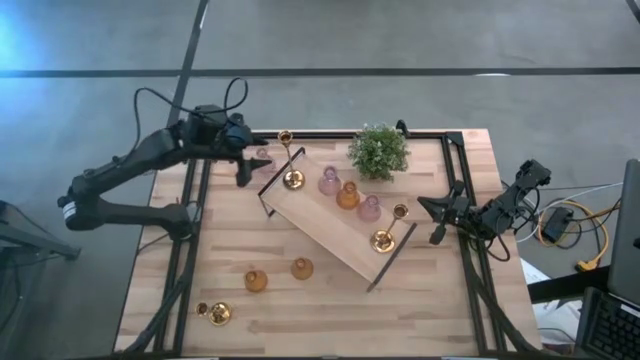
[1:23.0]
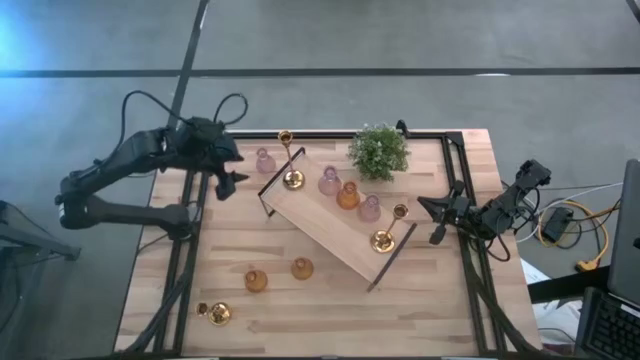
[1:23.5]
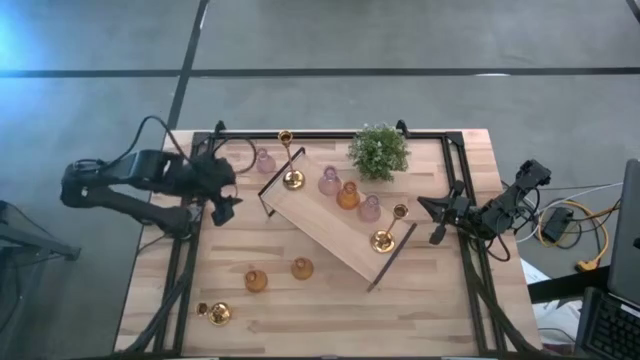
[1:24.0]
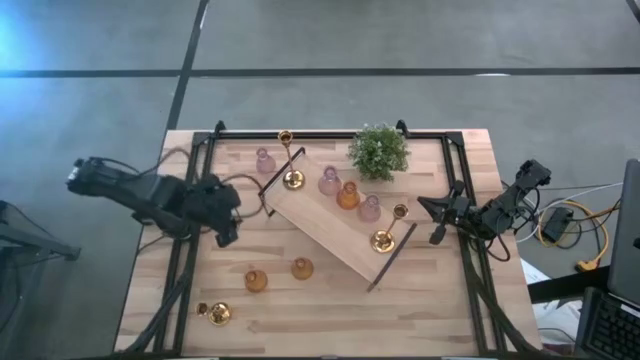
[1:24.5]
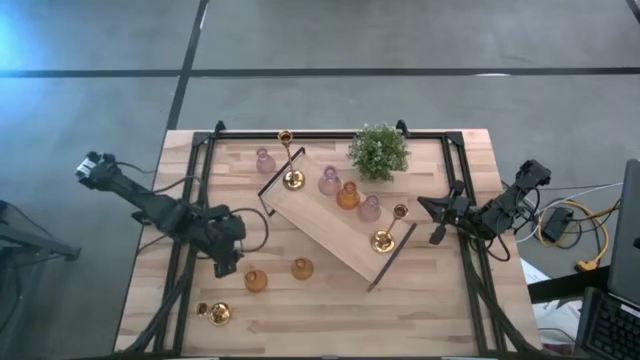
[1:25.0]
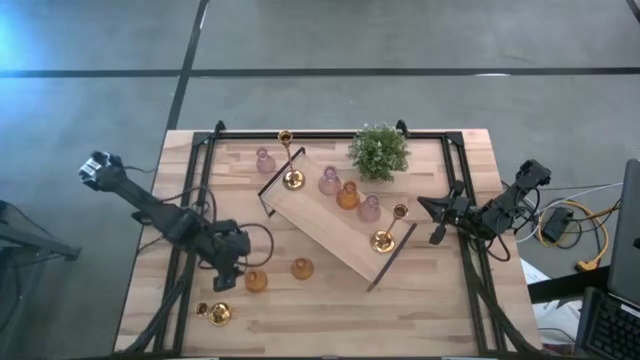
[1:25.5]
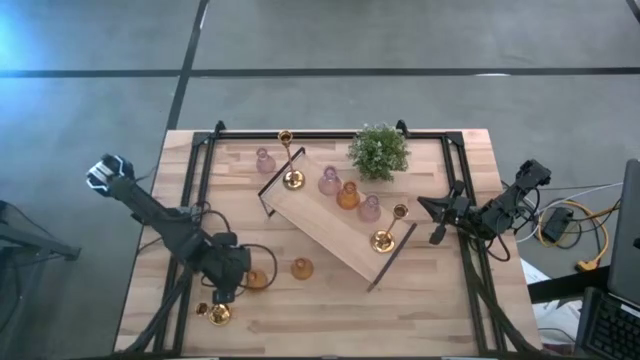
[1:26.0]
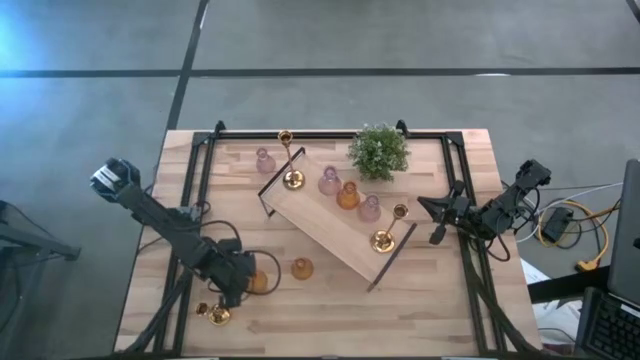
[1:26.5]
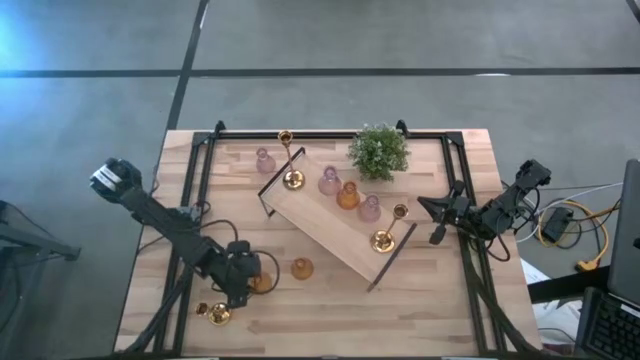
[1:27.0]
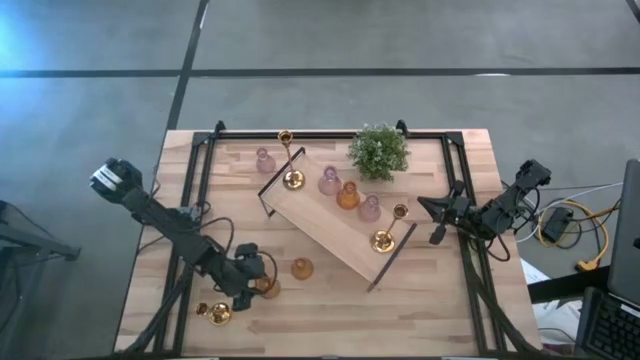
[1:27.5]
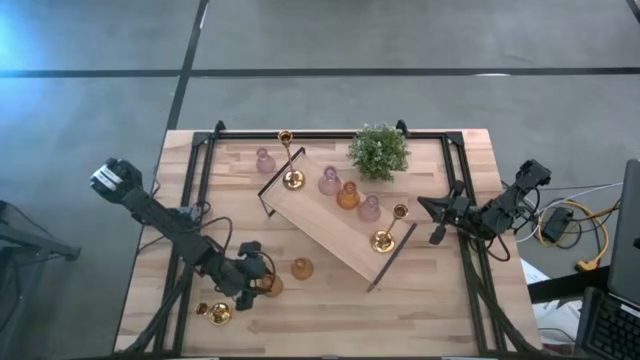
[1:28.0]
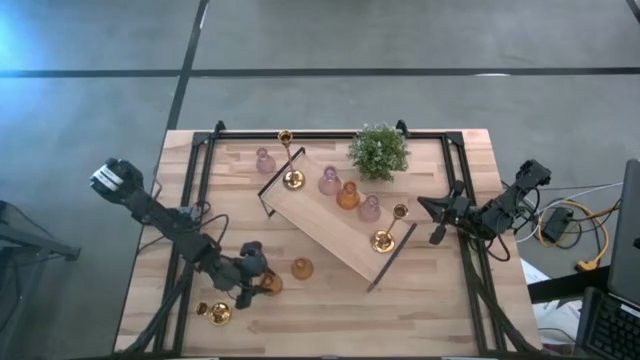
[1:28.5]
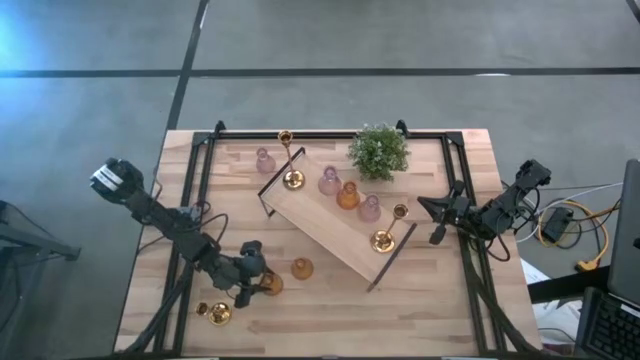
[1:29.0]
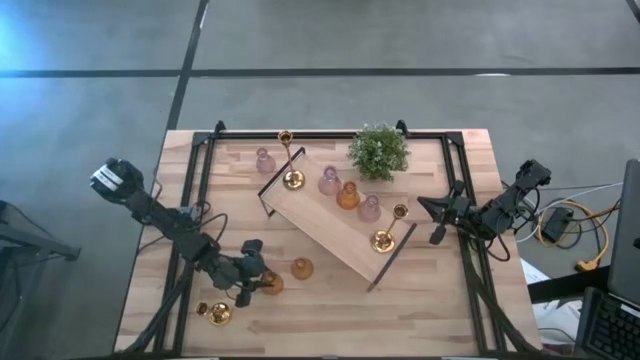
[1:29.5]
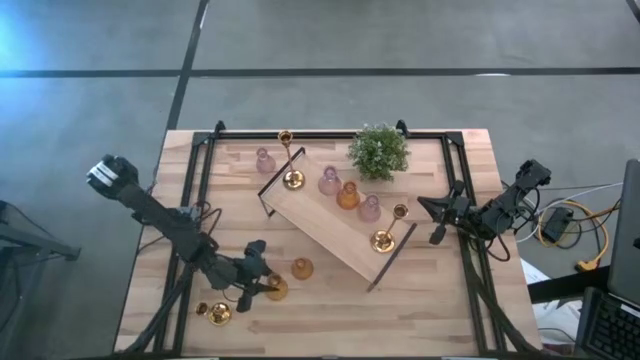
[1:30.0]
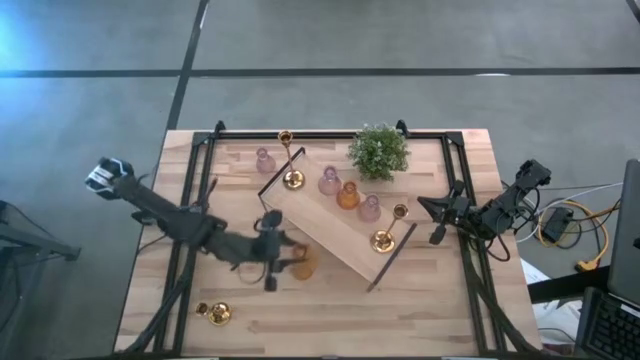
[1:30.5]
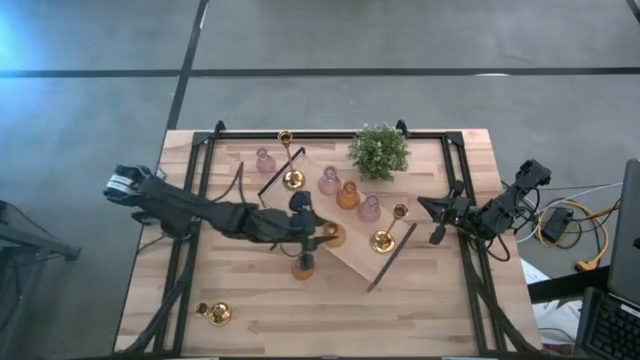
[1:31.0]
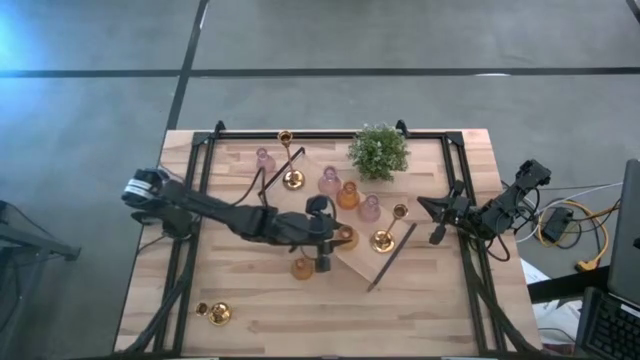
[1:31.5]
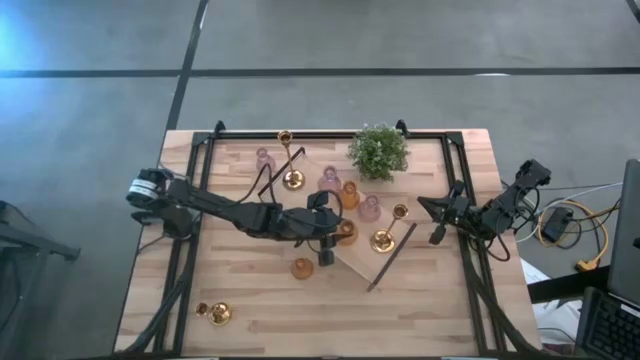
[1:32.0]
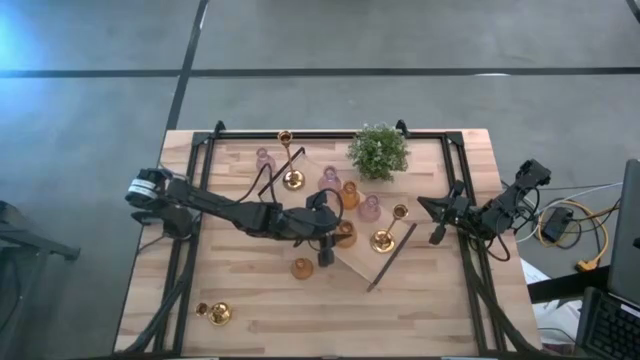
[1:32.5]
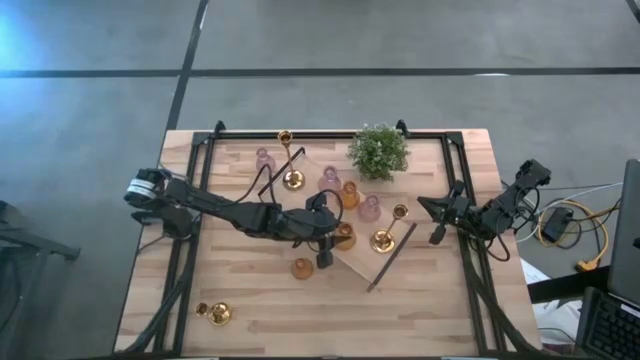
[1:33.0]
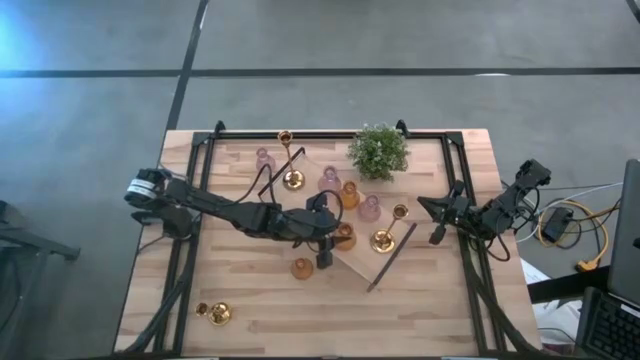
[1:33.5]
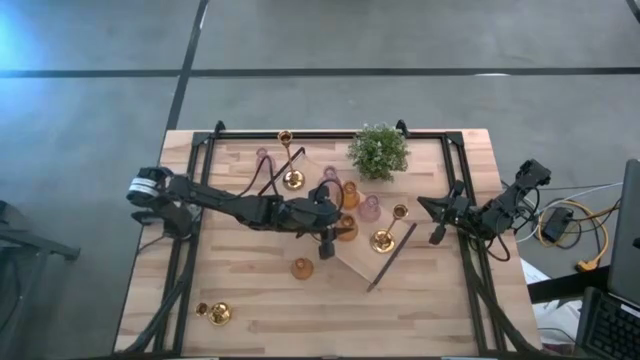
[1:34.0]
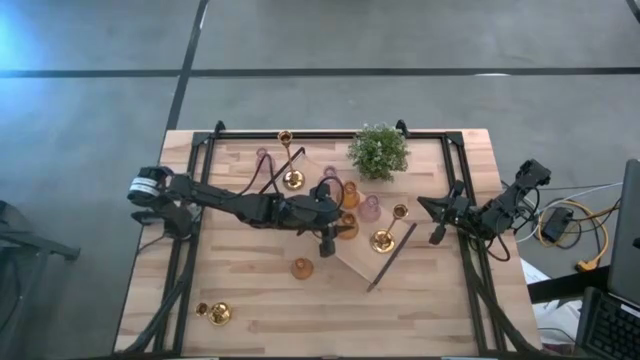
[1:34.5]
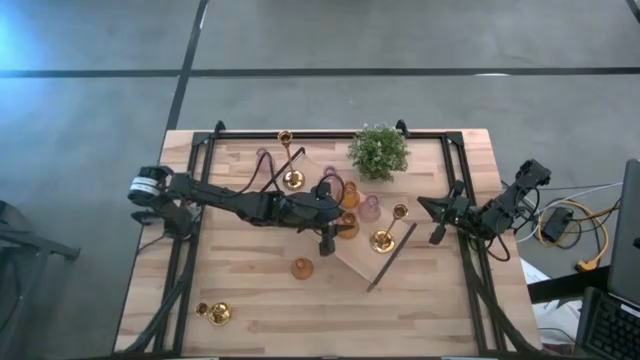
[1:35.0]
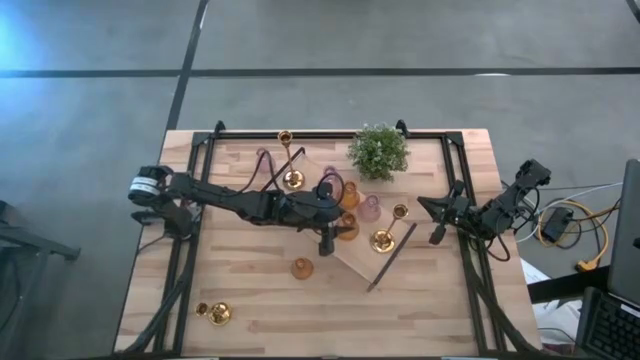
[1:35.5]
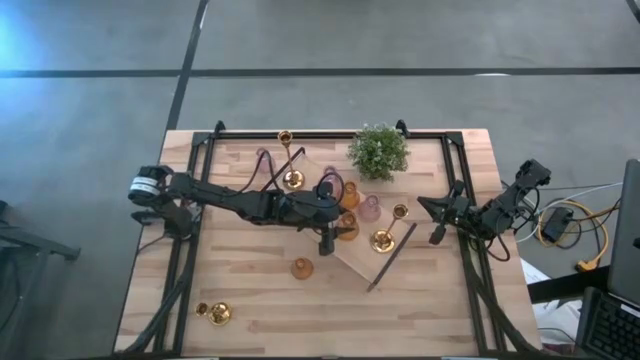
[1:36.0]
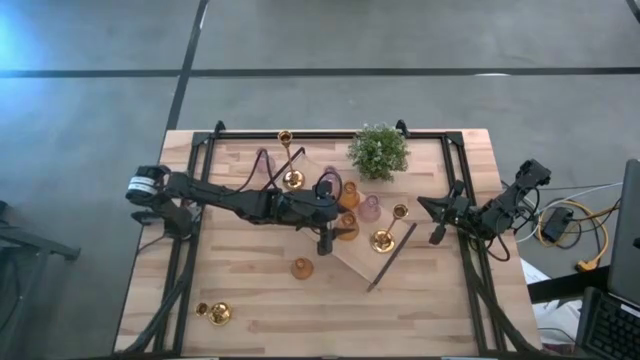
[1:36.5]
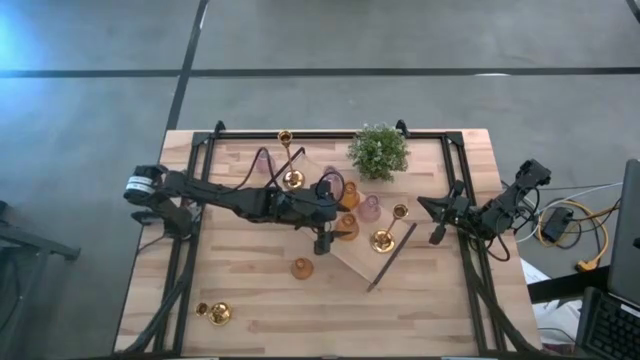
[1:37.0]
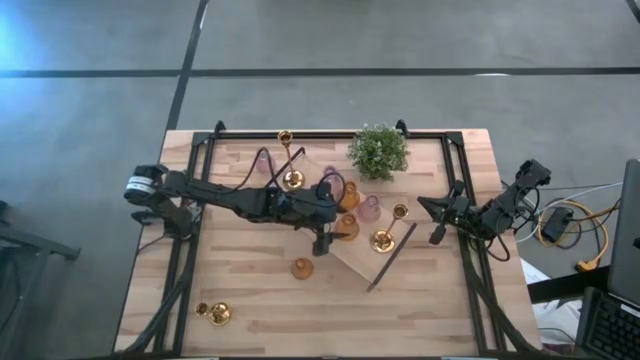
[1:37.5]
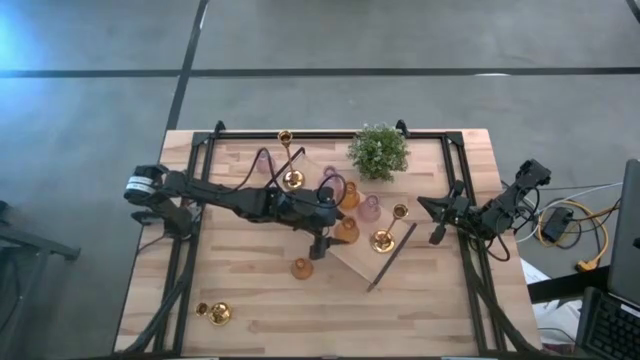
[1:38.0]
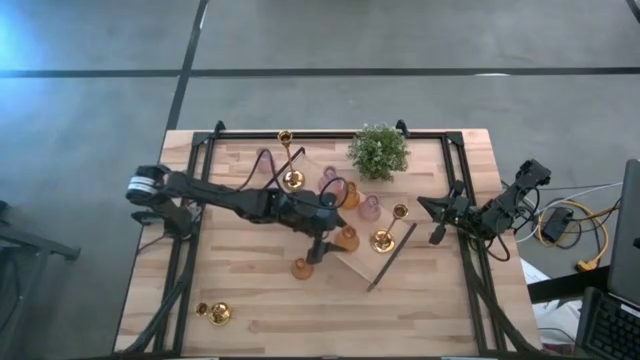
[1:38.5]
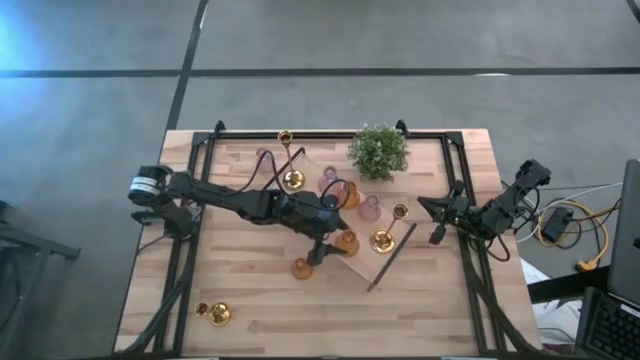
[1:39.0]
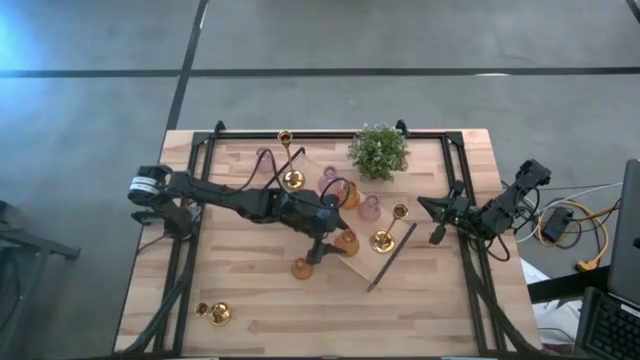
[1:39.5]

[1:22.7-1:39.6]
Task: Pick & Place candle stick holders
Put the yellow glass candle holder on the shelf

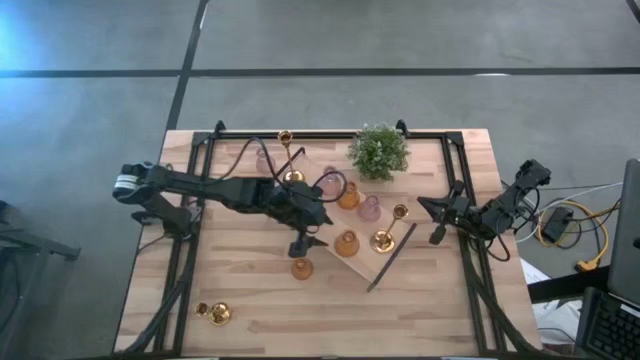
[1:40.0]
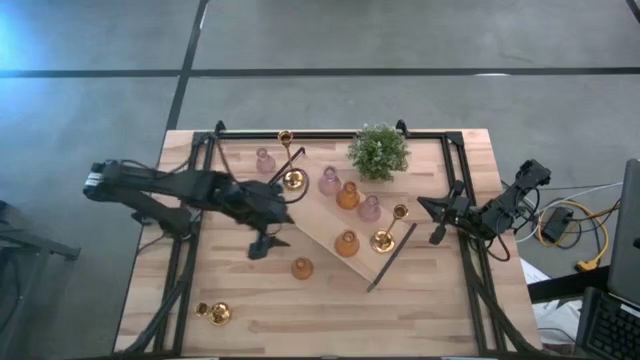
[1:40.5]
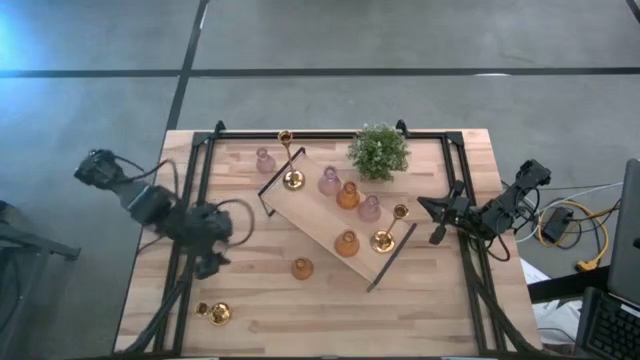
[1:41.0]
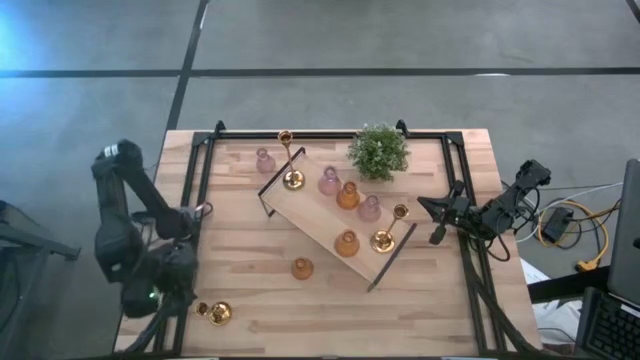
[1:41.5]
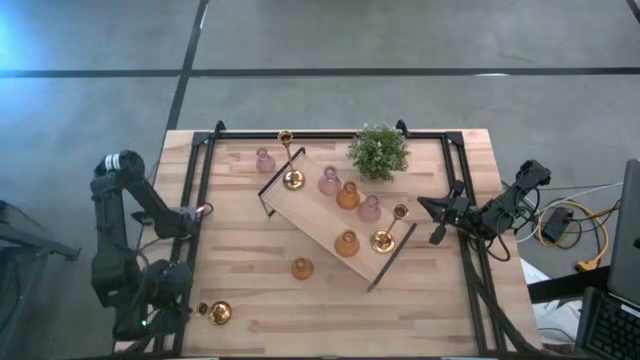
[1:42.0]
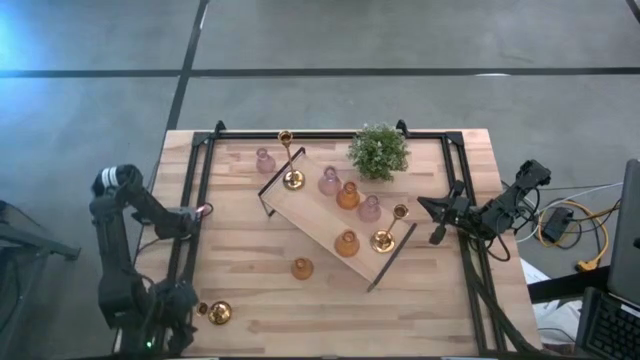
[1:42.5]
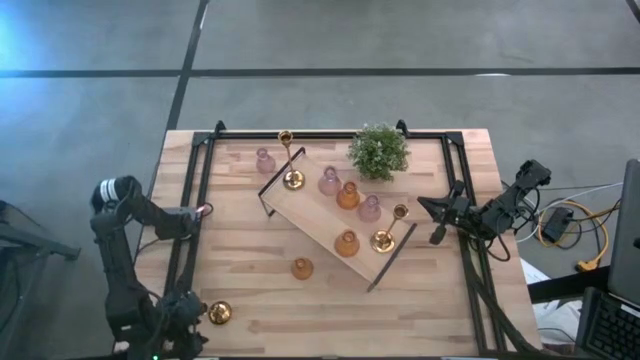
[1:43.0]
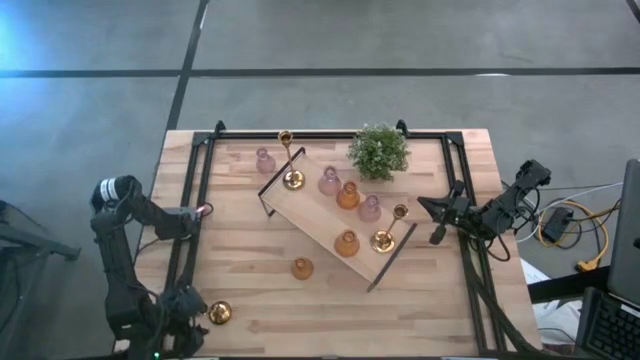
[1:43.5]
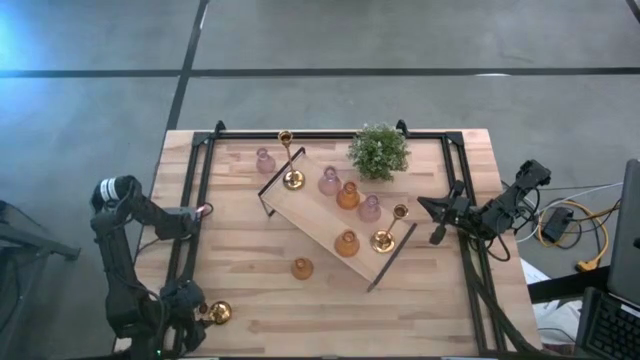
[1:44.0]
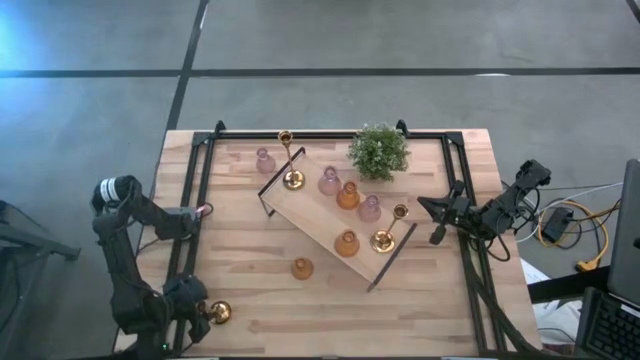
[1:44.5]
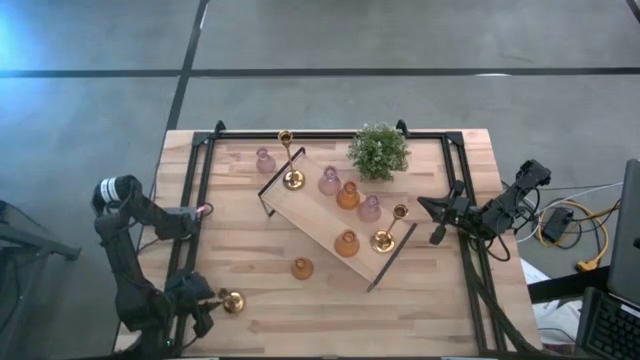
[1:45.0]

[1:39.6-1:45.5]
Put the gold candle holder on the shelf
